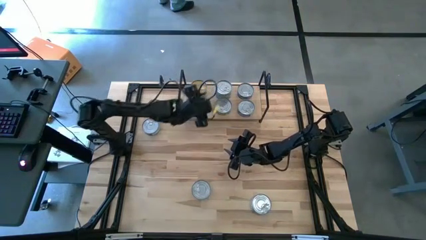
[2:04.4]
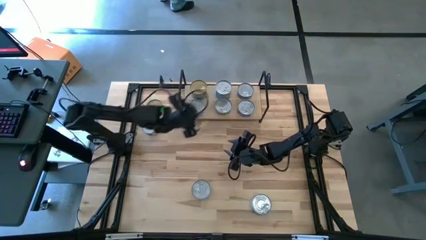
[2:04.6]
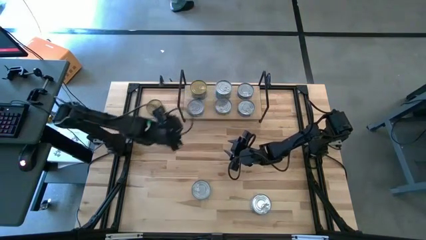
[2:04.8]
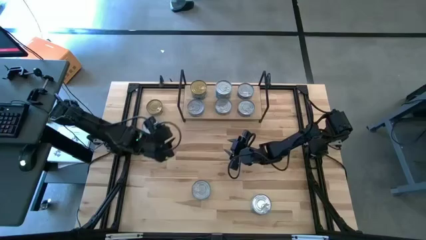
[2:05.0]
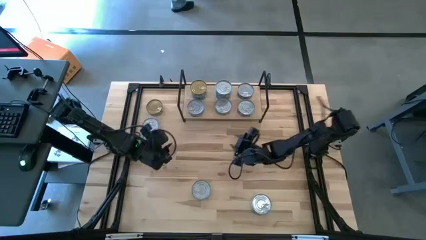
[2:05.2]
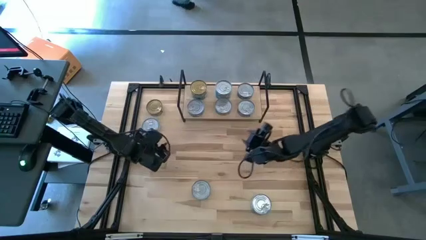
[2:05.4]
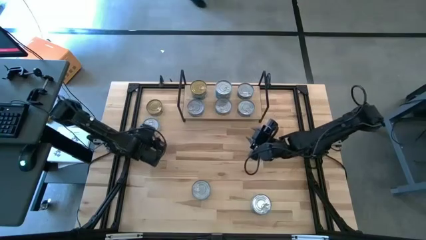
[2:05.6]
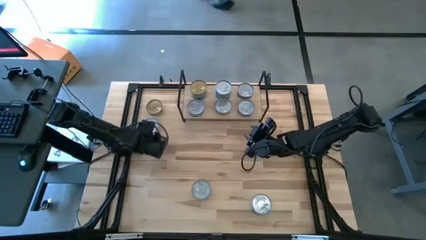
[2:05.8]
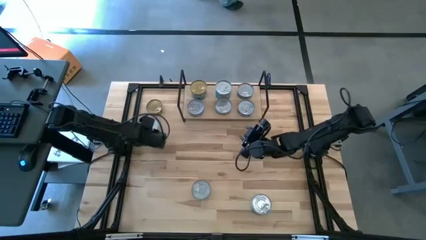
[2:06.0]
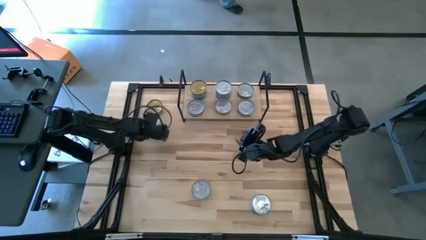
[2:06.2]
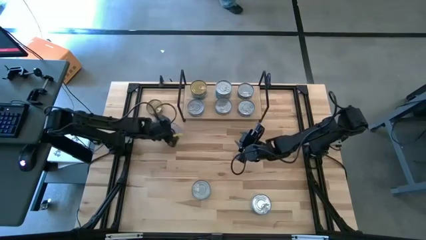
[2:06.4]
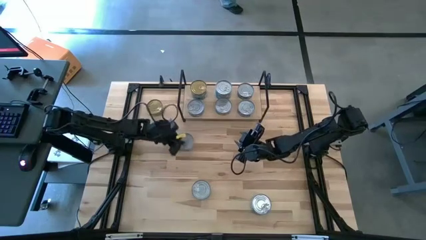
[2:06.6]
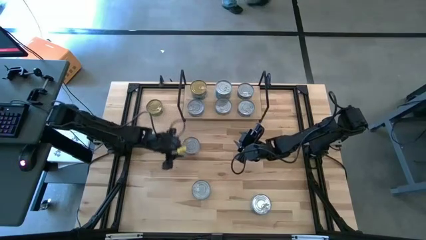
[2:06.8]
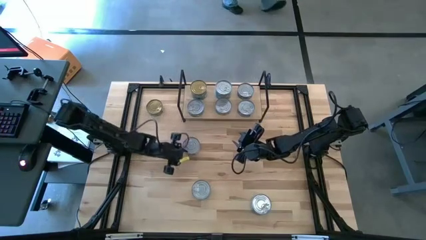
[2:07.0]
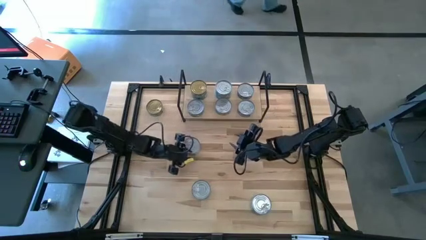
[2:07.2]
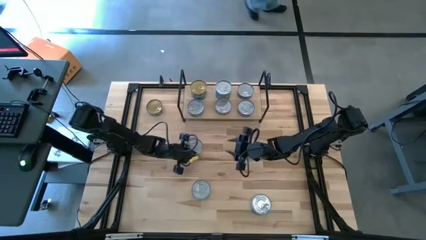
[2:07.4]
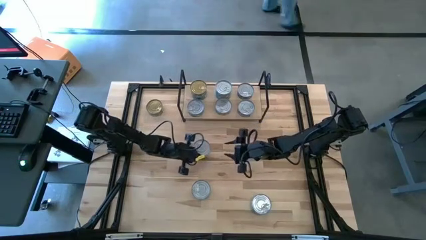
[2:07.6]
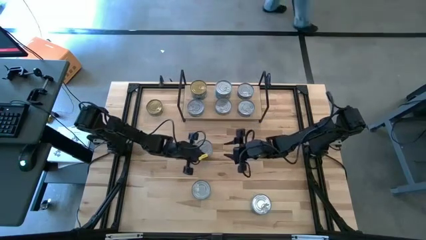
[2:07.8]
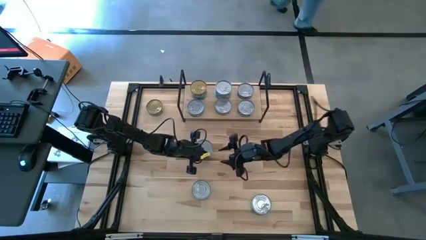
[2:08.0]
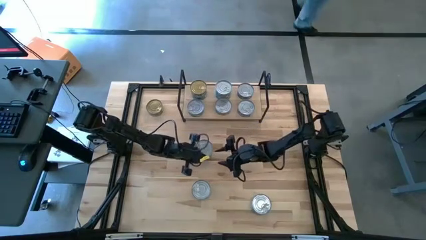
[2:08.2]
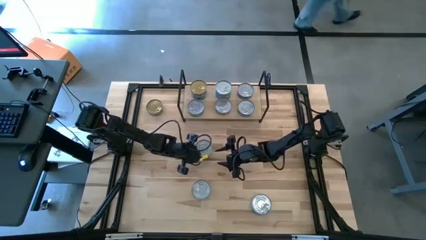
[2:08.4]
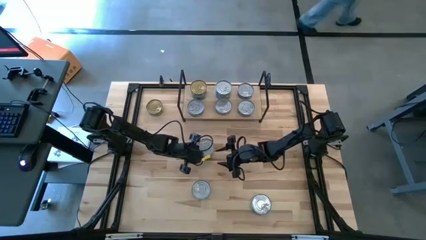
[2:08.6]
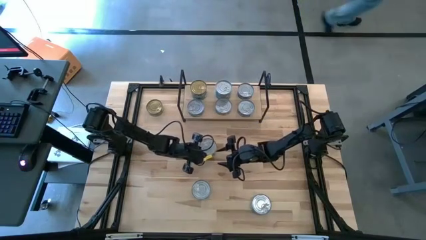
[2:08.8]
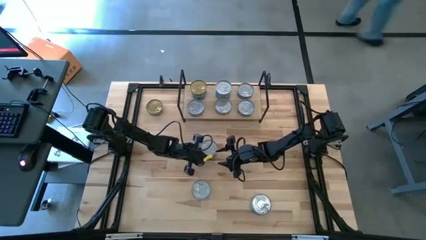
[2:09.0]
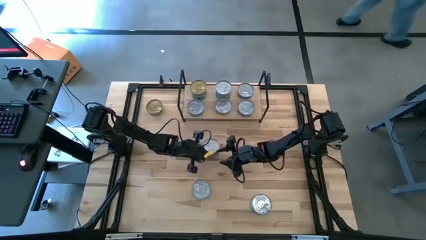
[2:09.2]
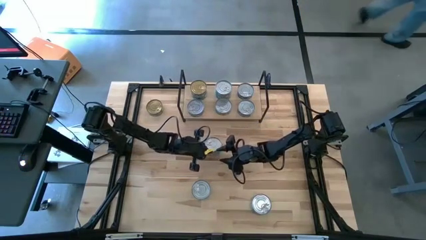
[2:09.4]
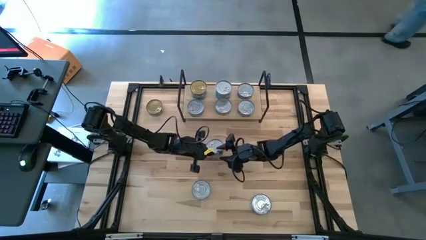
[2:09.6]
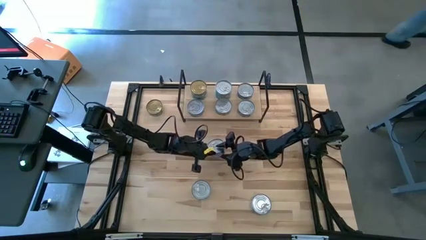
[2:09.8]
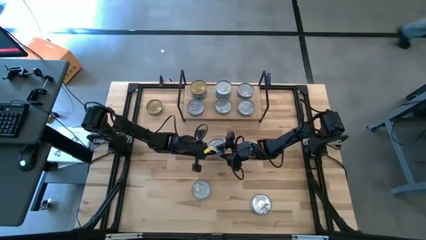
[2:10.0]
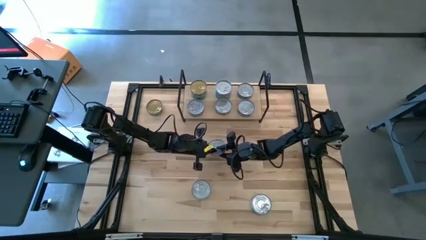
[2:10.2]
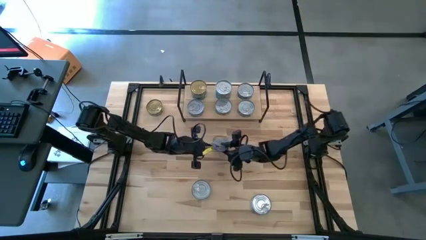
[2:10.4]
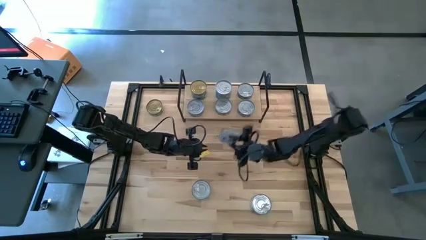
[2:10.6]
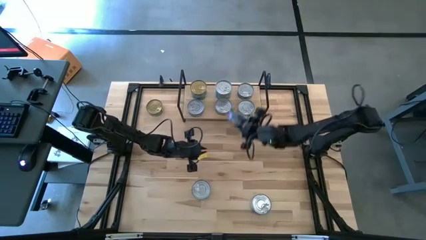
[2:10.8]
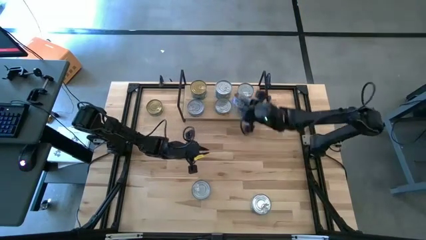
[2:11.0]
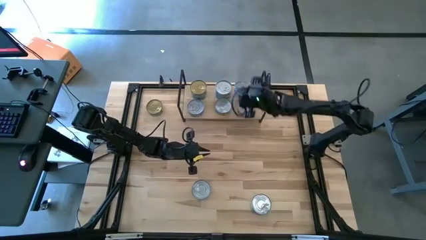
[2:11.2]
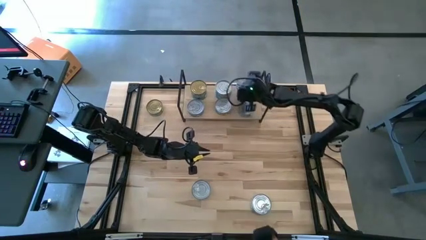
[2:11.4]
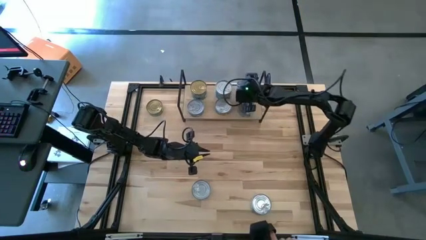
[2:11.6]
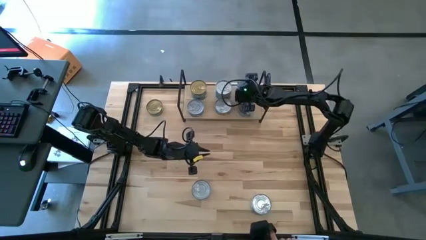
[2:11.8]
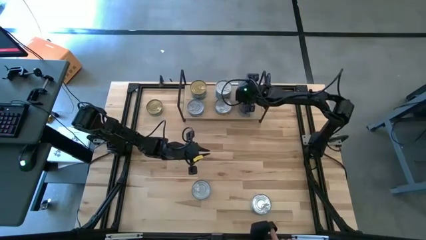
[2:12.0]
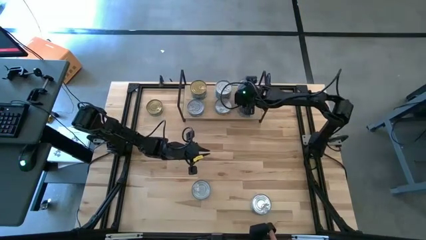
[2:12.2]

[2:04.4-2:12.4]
Task: Stack canned seafood by type on shelf
Stack the dark blue tuna can on top of the dark blue tuna can on the shelf

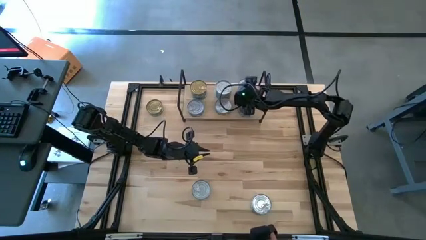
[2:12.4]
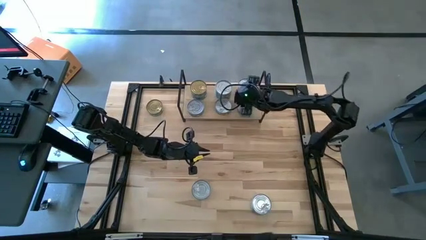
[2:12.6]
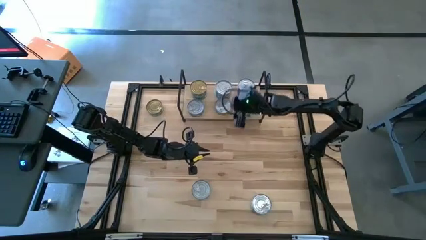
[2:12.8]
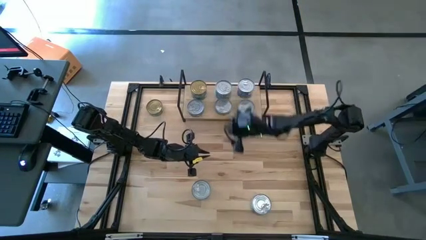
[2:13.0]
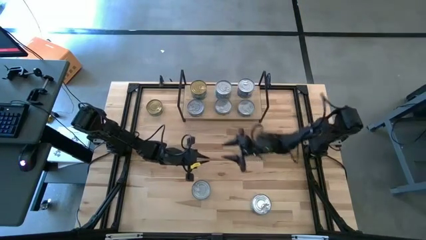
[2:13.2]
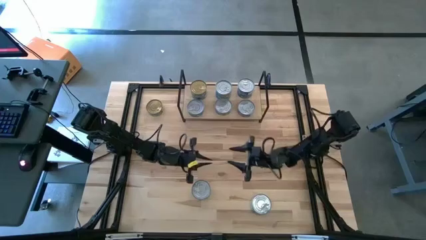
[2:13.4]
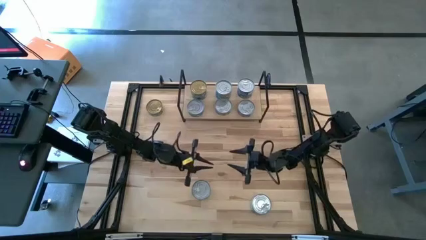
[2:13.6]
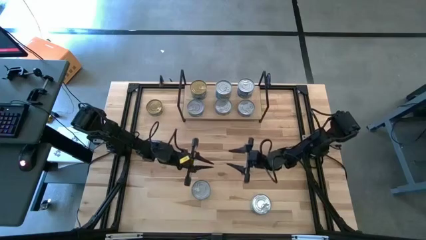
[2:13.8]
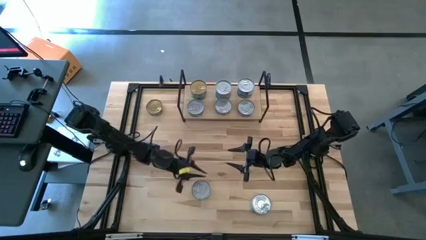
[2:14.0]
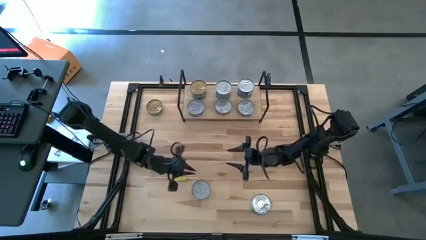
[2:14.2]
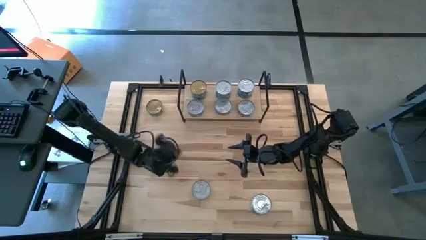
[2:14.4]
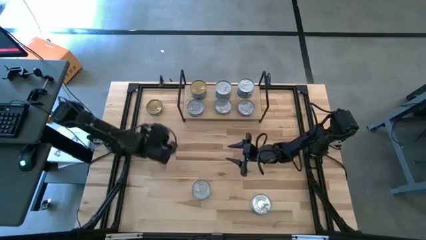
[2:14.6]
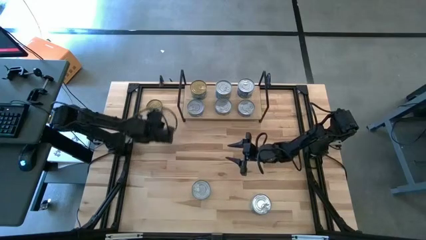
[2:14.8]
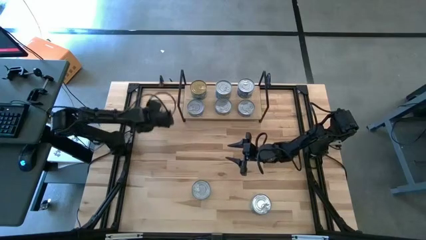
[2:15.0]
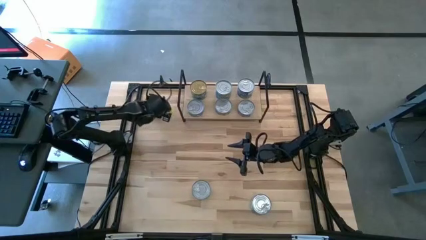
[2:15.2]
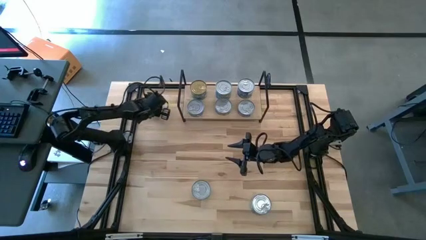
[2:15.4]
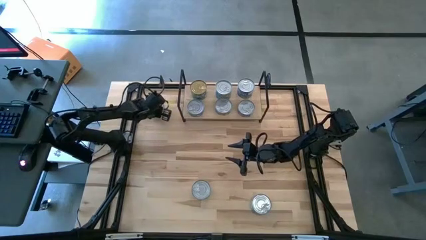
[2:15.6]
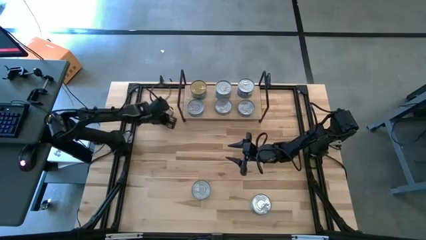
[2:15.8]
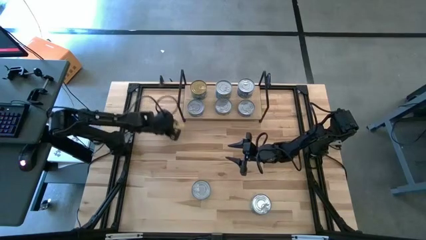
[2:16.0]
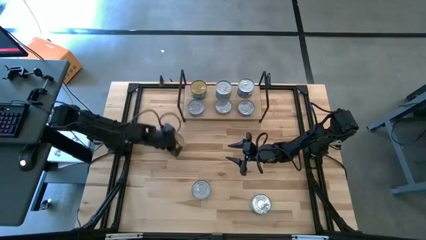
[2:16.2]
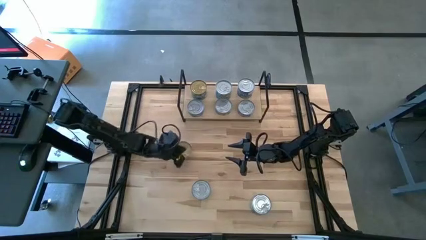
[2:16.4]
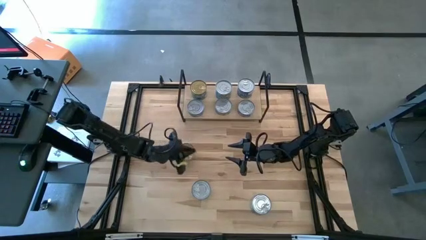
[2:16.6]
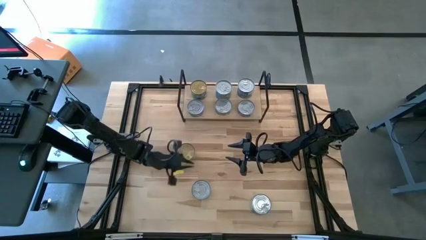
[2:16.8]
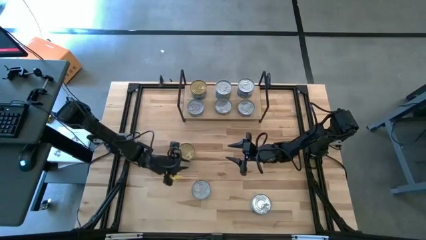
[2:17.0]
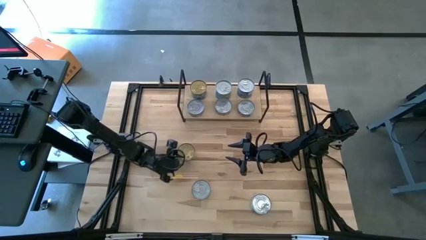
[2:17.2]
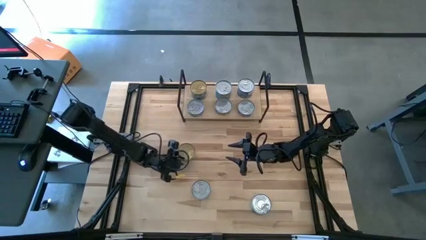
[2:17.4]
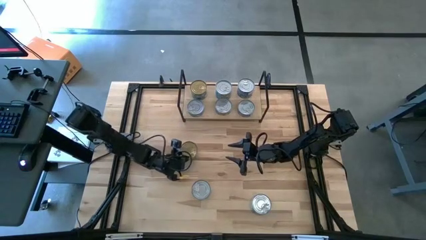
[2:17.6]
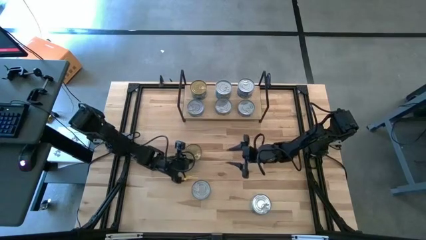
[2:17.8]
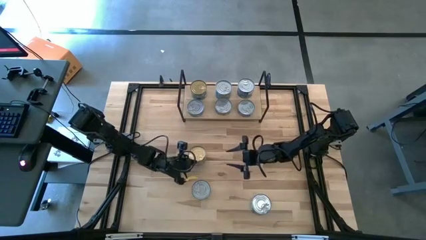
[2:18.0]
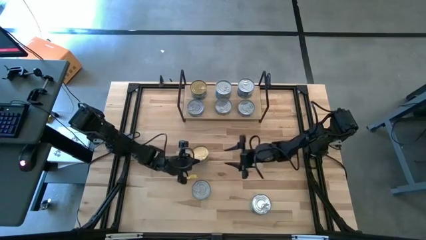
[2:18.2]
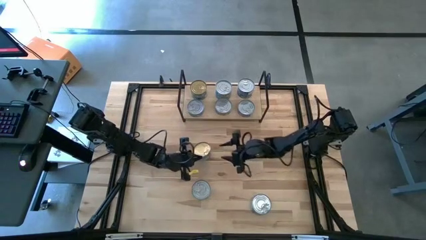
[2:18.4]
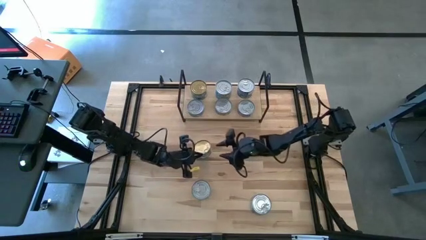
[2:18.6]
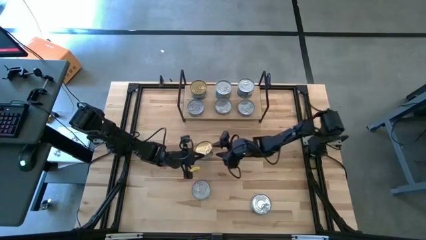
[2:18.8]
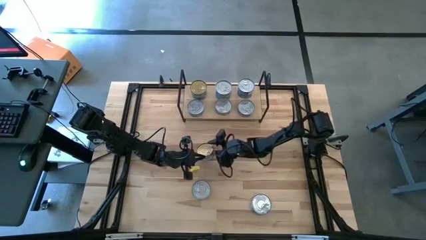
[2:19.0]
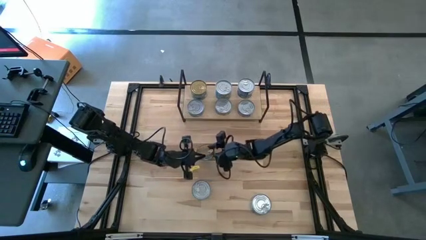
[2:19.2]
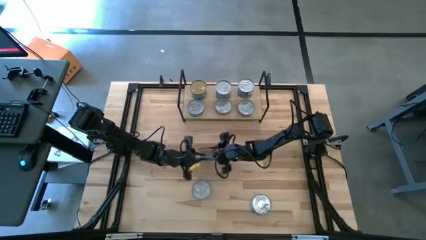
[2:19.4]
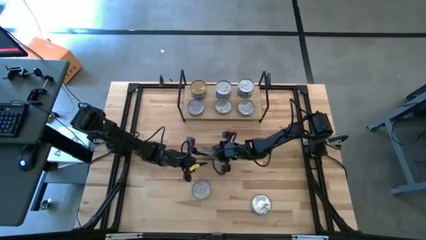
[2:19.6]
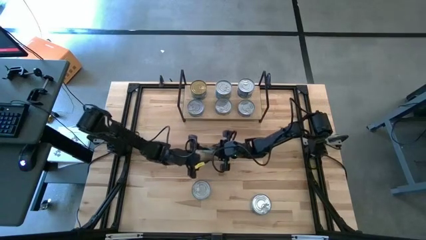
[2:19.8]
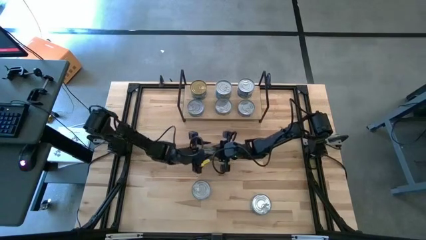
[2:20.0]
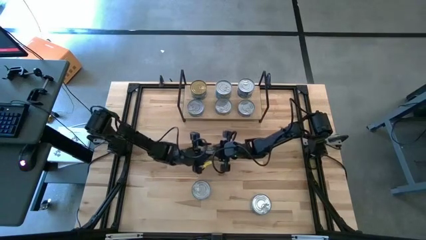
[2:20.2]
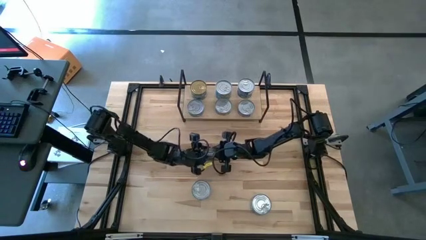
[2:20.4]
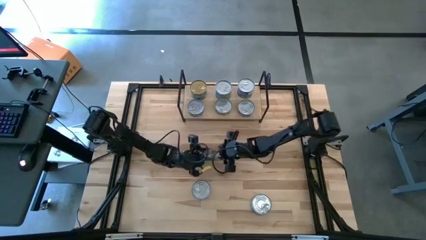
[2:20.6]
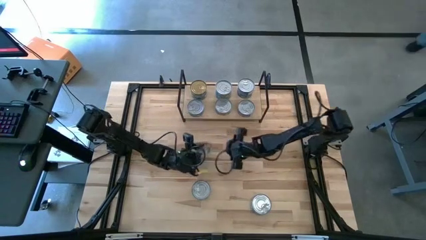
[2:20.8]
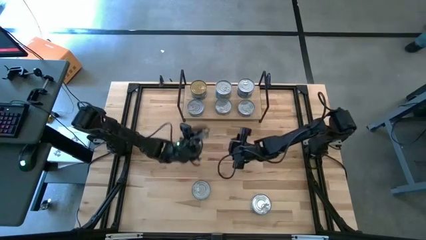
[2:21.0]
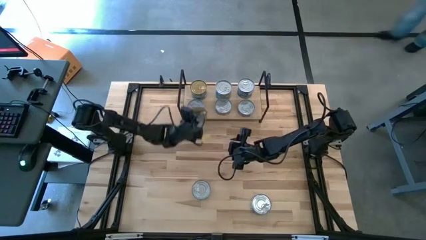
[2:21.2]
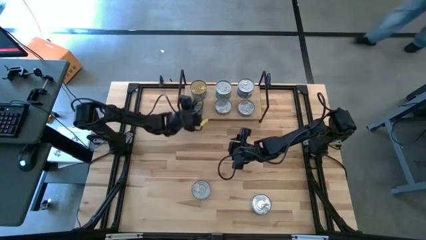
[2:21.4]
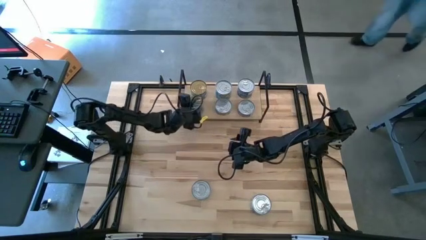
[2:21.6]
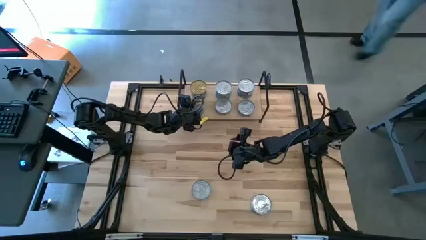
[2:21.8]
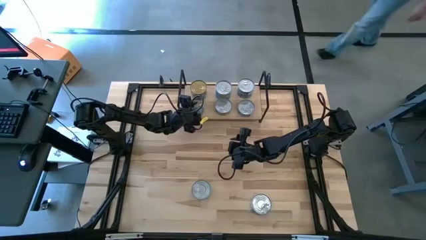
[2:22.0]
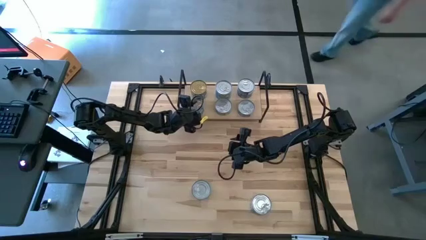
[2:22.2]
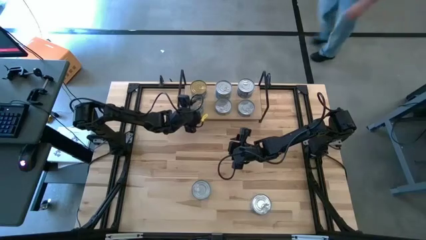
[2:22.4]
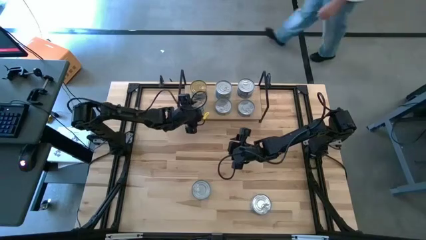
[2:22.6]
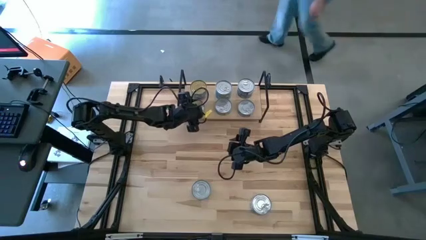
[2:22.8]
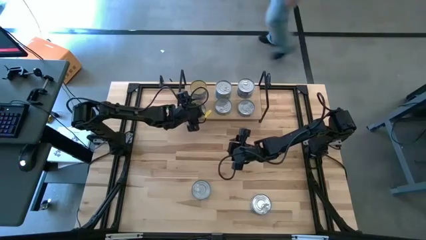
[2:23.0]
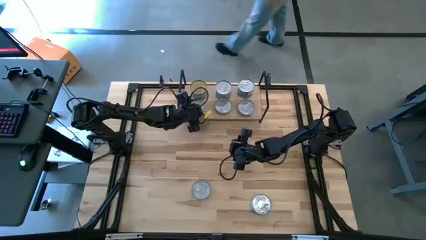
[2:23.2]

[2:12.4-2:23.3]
Stack the green tuna can on top of the green tuna can on the shelf
